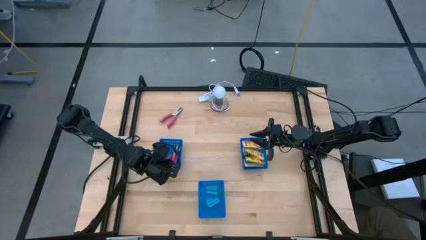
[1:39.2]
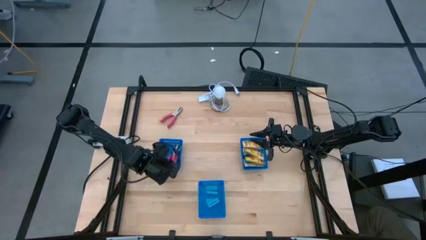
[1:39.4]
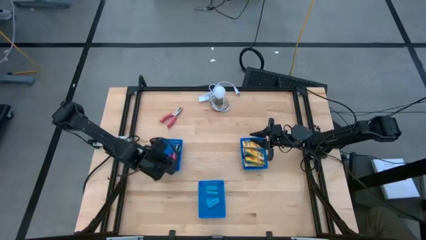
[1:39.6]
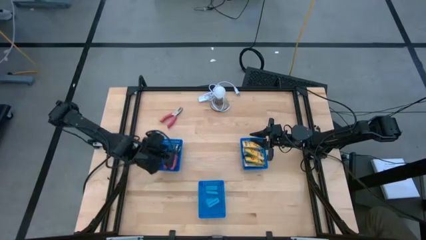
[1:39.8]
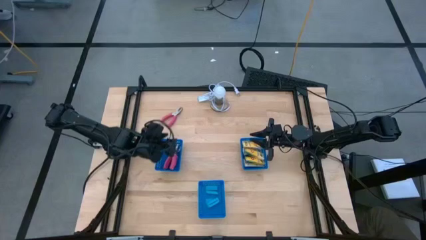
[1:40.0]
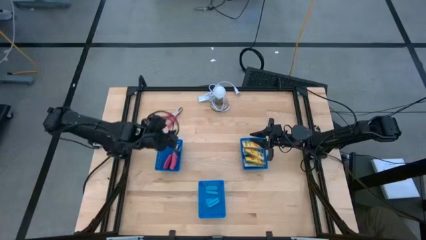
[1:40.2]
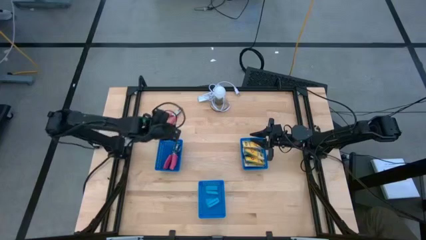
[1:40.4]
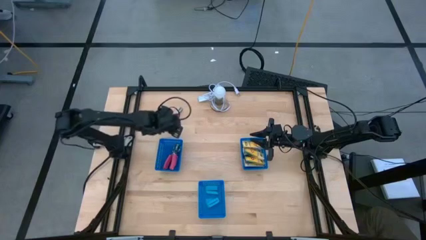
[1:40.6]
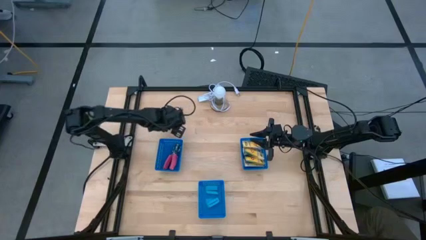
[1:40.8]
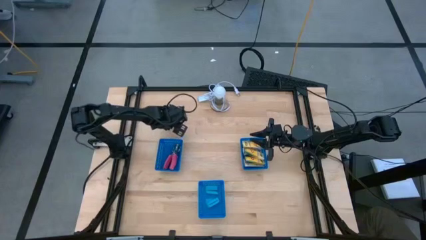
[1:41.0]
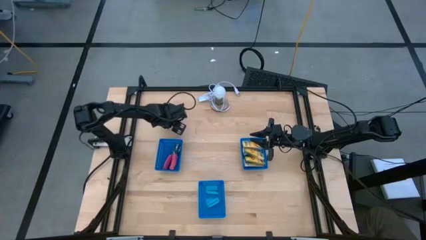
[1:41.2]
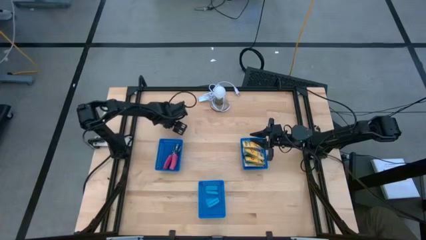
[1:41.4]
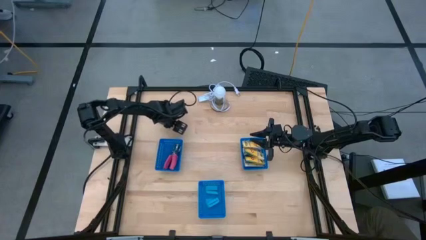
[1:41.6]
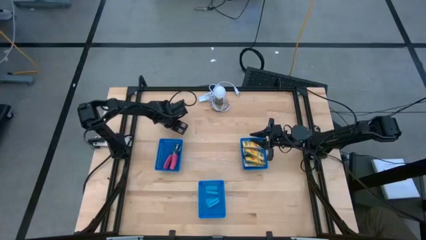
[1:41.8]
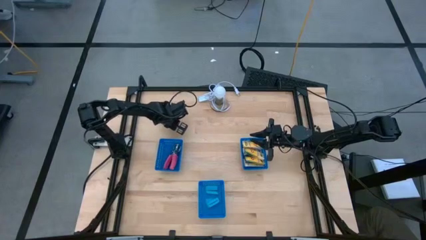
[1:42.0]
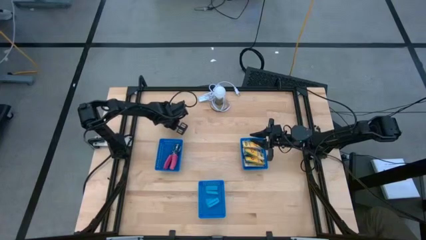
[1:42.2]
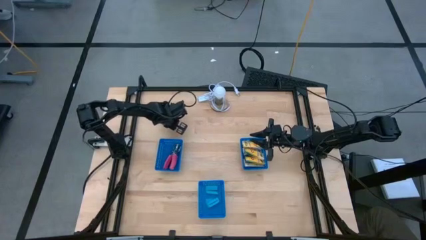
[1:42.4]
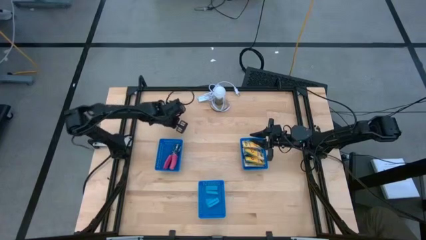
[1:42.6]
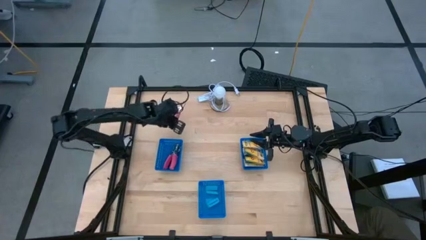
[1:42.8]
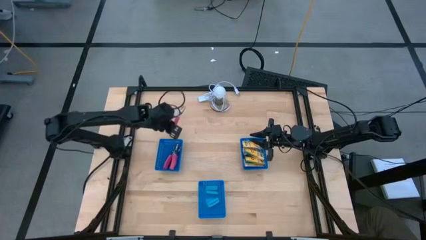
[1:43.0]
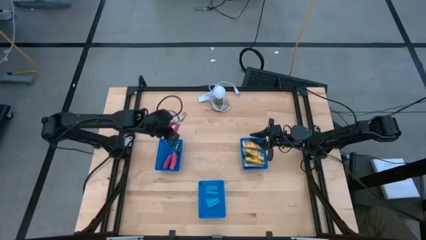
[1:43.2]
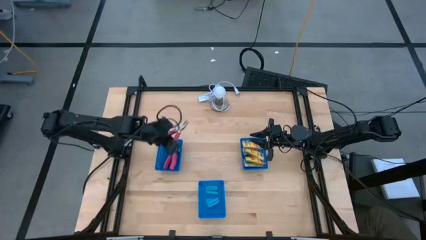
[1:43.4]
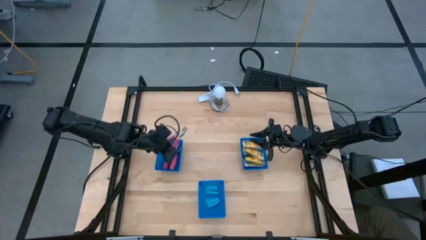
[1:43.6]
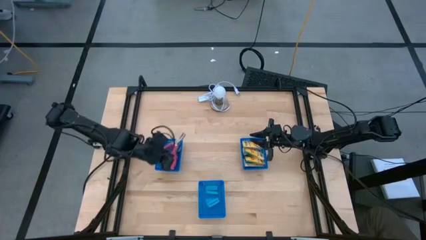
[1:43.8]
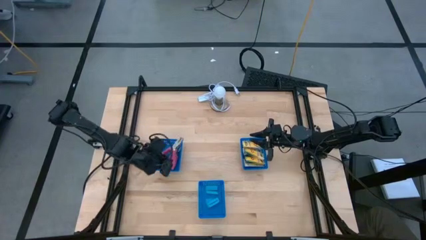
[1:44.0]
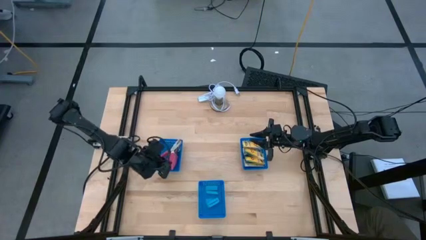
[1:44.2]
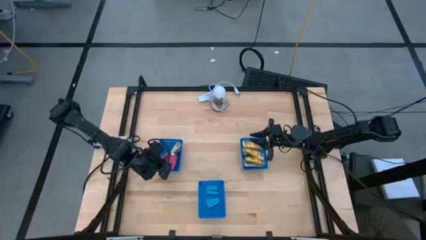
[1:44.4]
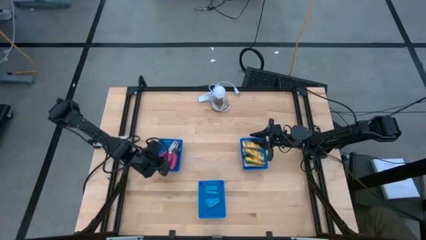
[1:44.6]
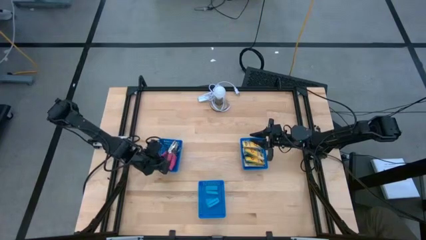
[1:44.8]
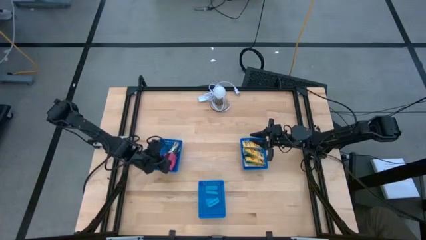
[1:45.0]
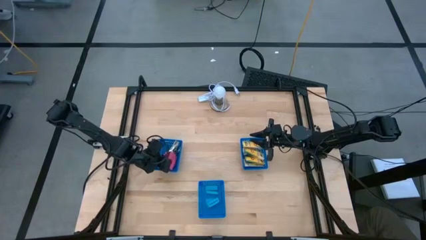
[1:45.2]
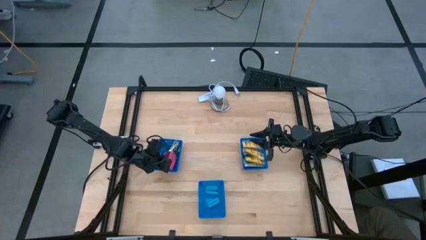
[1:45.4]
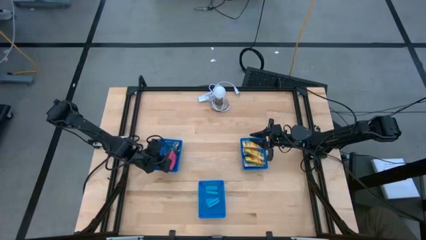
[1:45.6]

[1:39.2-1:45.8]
Task: Pick & Place School Supplies
Put the pink hole puncher into the top left blue bin

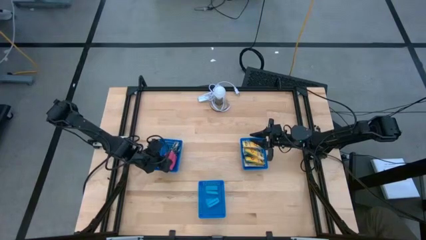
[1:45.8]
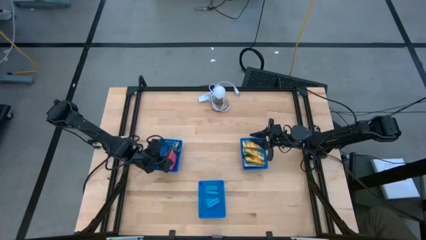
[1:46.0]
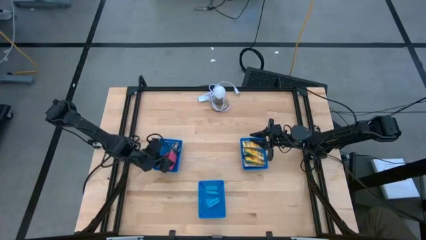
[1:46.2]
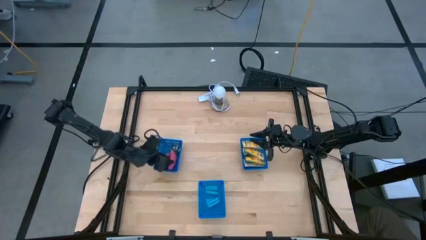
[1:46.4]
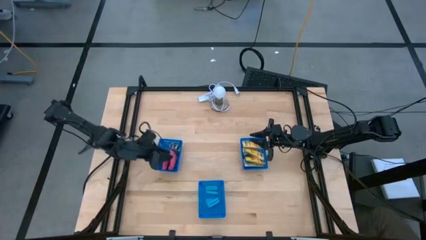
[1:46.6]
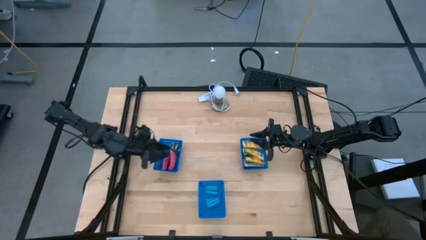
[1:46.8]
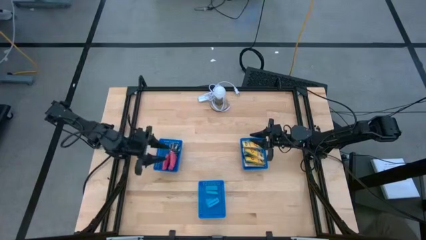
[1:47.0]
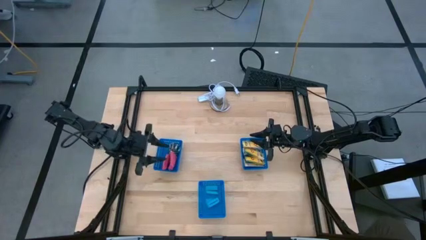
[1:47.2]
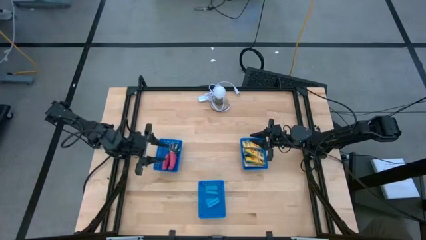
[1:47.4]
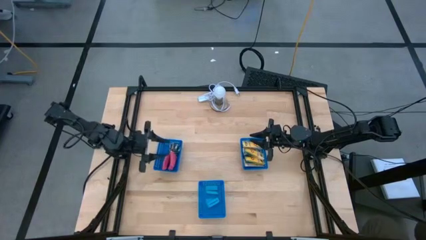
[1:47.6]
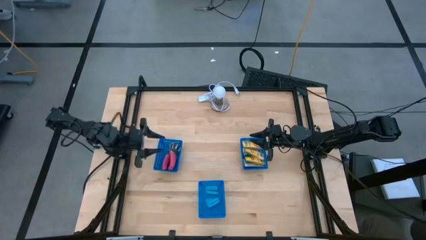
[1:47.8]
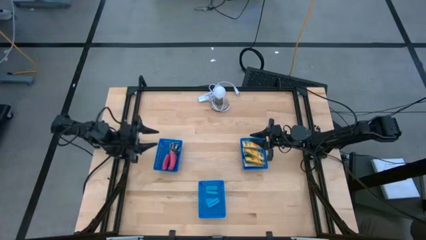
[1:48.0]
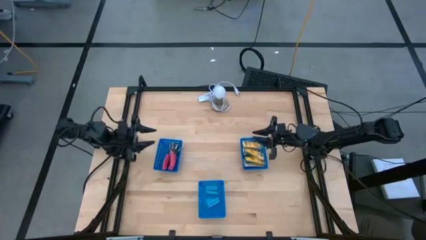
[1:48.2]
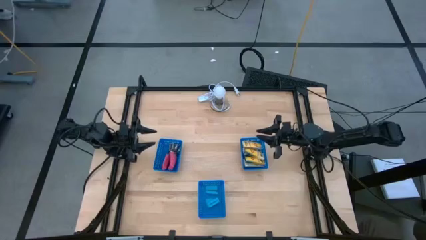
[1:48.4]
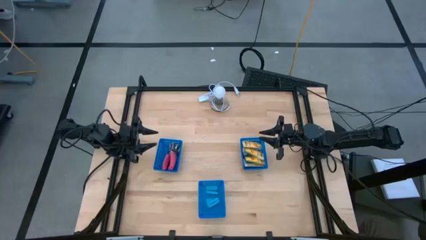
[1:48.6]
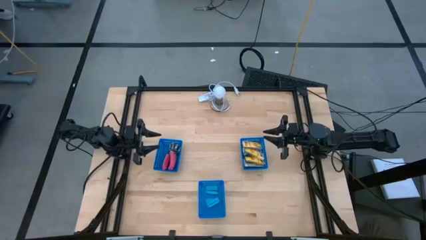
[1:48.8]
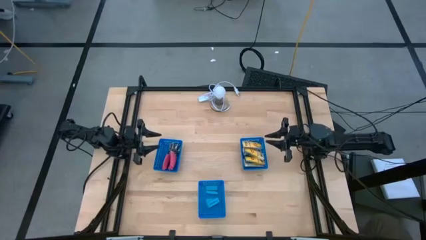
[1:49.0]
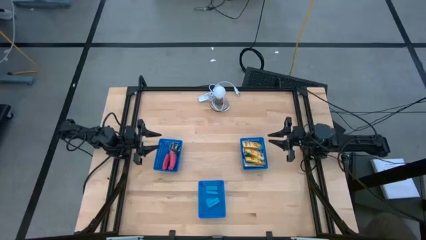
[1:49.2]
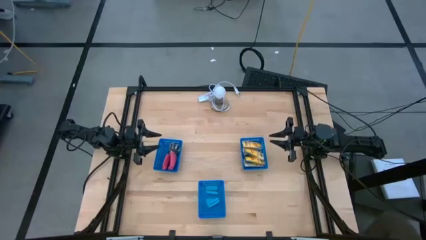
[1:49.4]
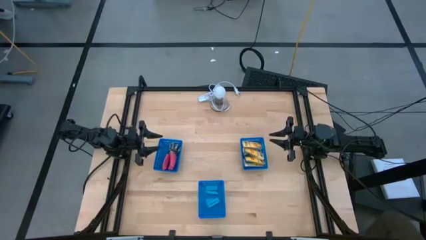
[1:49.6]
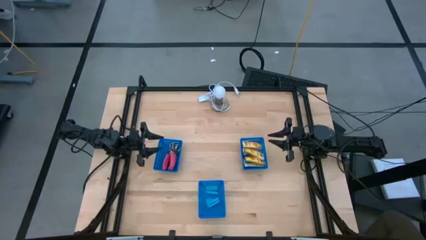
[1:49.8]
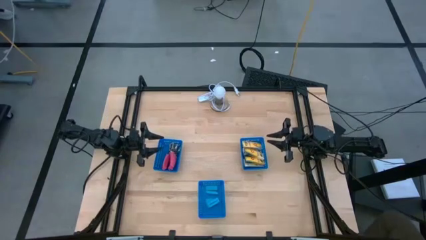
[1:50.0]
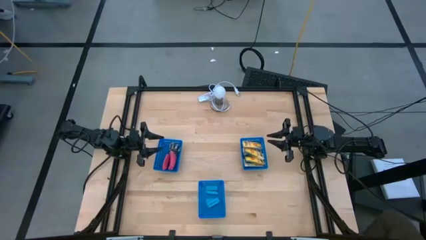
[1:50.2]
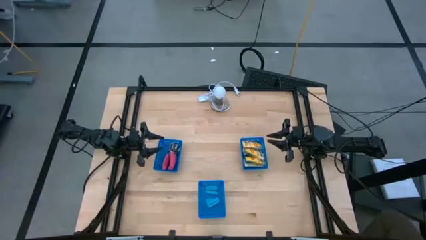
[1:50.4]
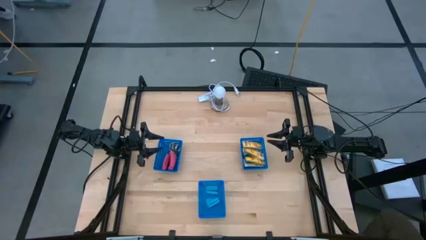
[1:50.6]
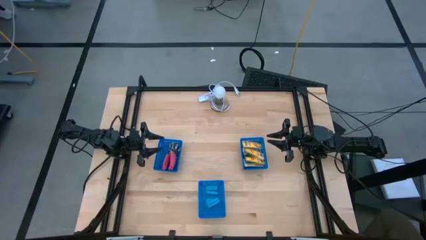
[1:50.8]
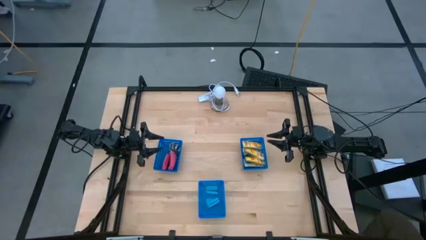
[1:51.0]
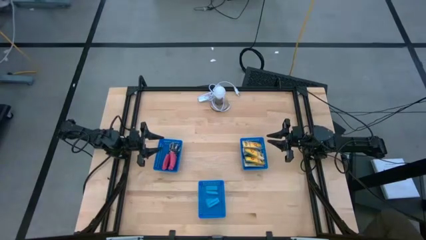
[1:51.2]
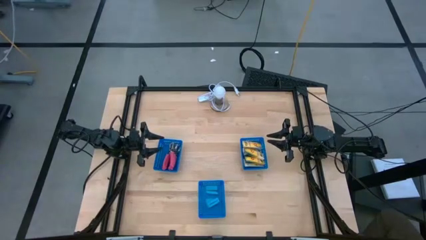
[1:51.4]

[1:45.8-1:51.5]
Return to Home Position
